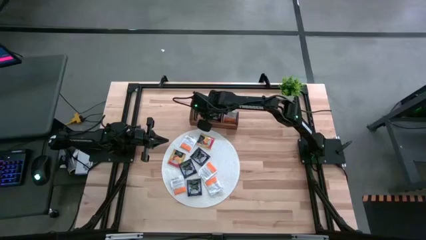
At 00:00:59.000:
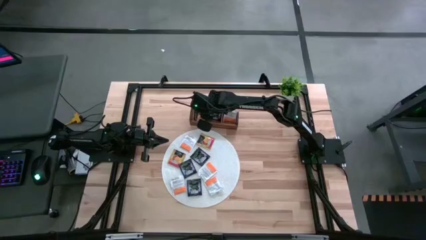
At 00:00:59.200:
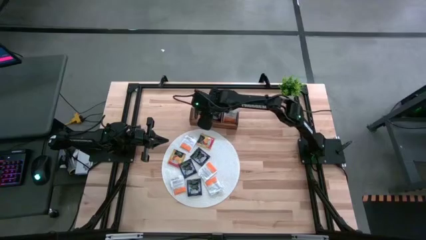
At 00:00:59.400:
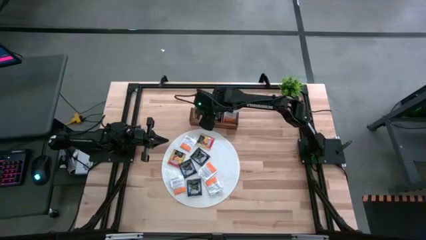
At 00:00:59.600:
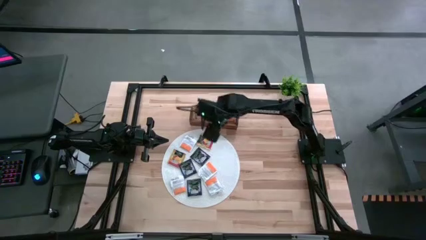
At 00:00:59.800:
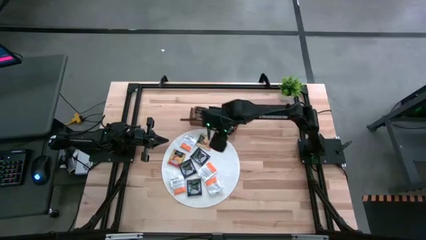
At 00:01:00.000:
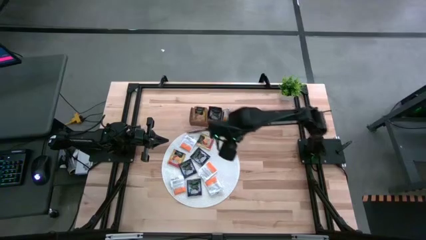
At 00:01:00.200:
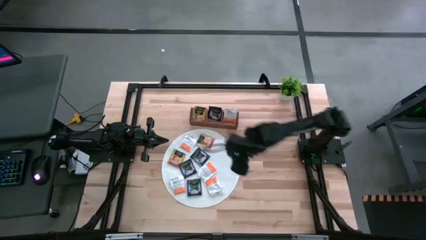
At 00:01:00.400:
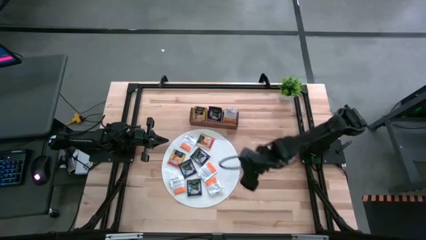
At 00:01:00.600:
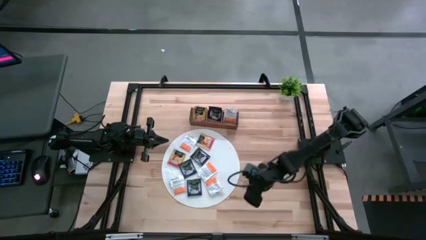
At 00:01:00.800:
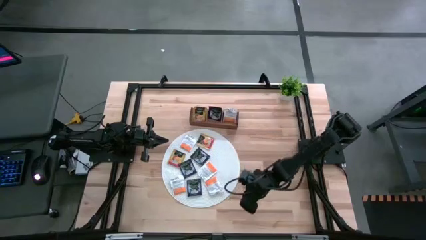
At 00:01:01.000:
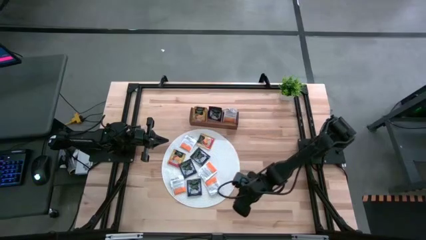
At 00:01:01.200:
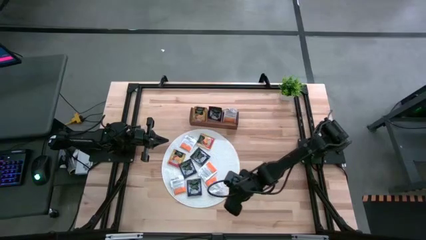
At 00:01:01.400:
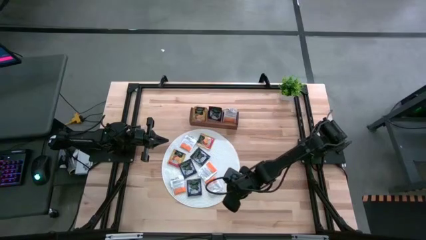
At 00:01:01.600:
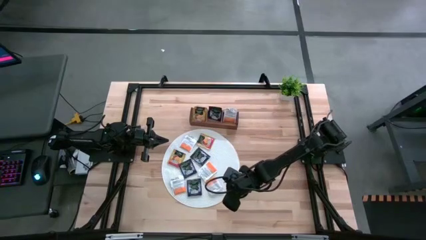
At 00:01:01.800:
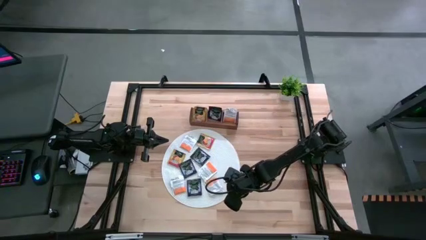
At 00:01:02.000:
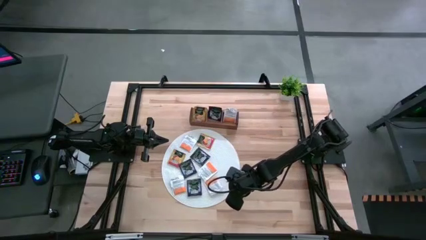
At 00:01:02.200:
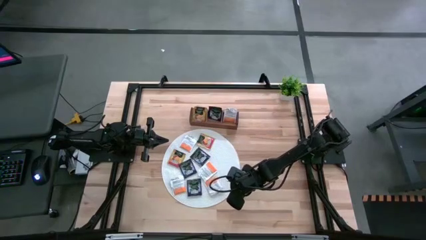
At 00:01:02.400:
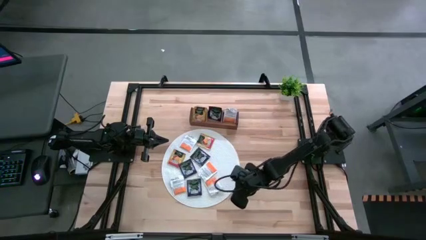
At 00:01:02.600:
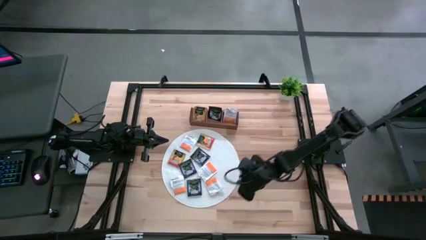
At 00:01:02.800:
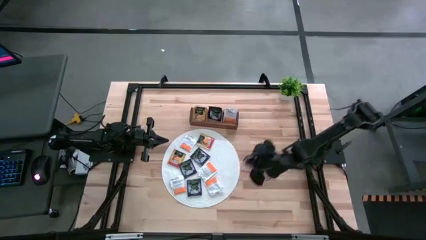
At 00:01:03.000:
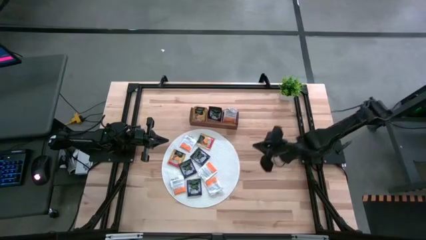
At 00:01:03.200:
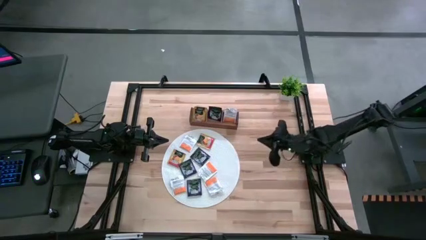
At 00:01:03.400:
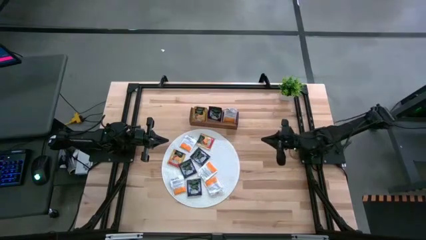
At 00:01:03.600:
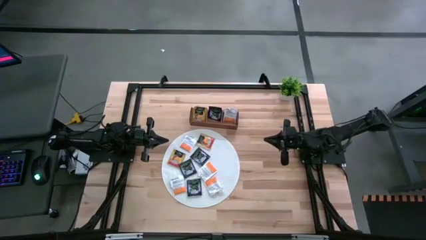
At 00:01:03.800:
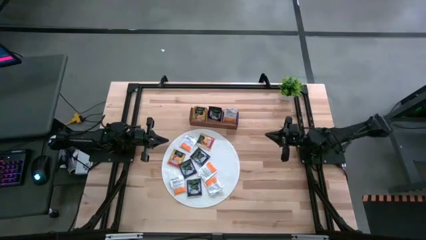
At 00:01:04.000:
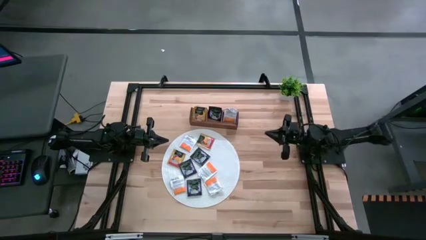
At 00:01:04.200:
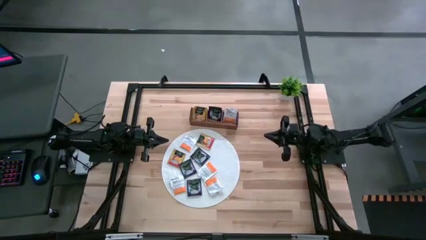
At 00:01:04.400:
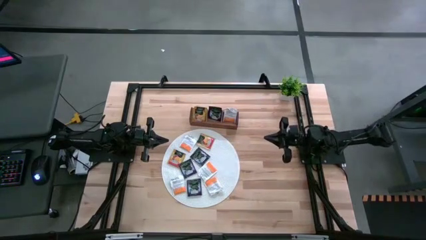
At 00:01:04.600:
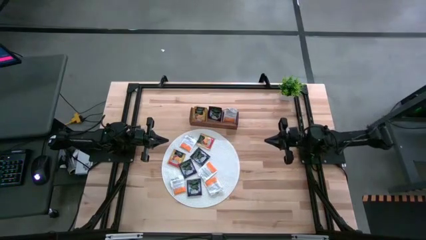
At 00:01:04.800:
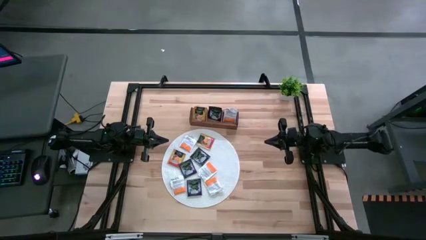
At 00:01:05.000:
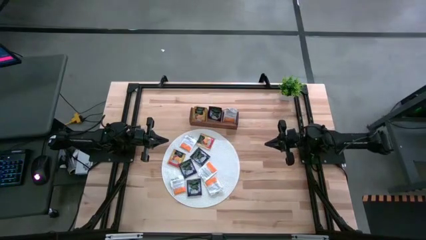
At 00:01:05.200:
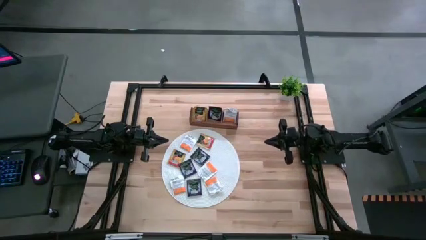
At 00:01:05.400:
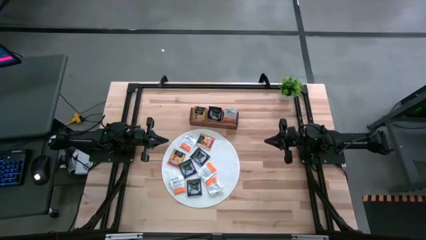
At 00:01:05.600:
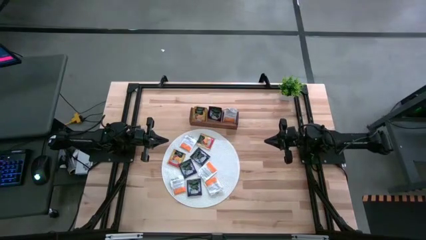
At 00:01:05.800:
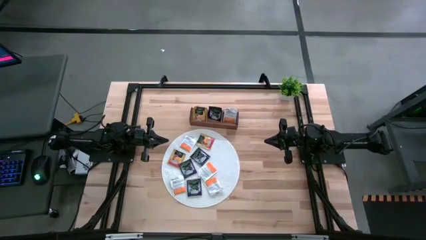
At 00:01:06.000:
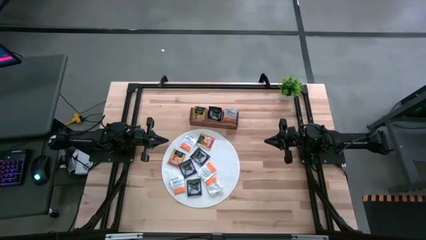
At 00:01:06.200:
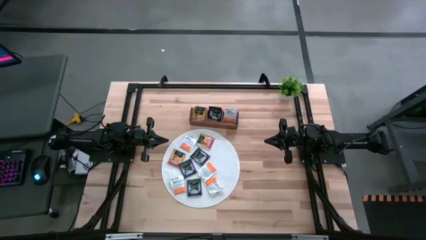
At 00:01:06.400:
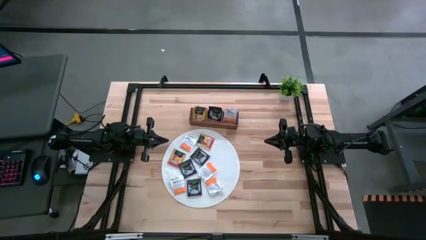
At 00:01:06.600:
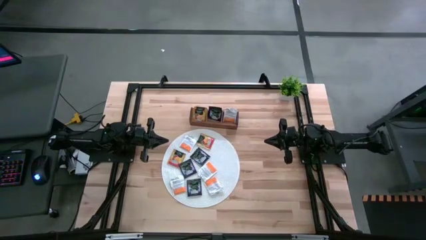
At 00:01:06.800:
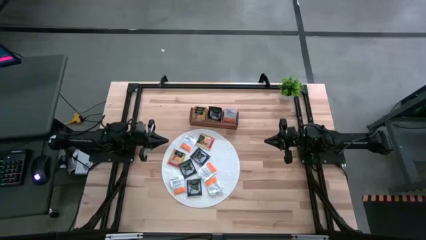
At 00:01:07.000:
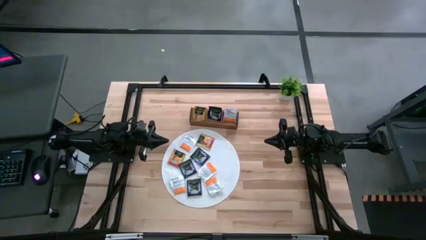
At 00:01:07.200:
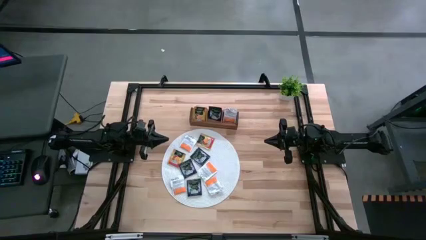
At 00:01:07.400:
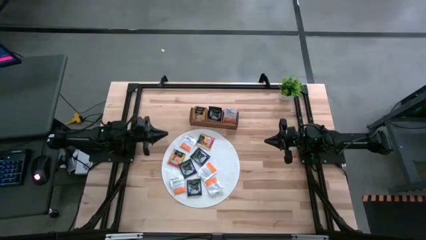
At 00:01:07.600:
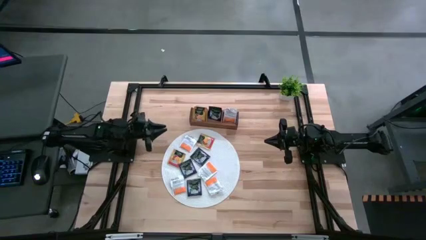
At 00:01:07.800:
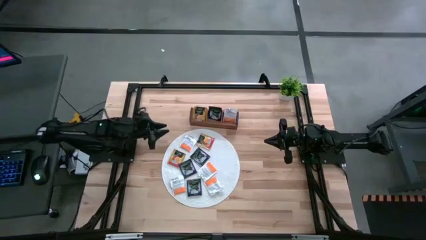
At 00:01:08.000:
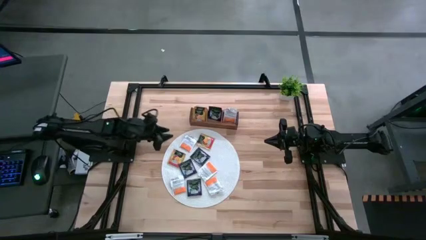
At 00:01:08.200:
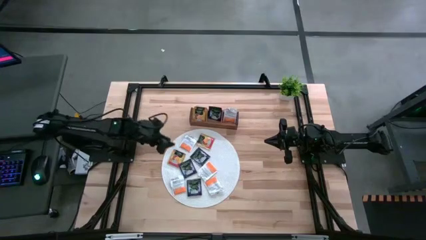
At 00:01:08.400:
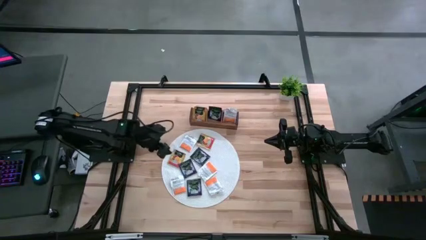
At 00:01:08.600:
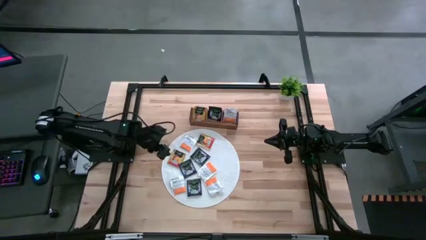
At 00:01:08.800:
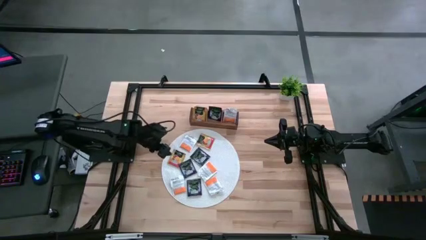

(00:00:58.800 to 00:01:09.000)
Task: Pick & Place Tea
Put the yellow tea bag into the left section of the wooden organizer

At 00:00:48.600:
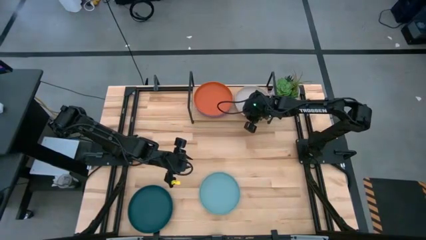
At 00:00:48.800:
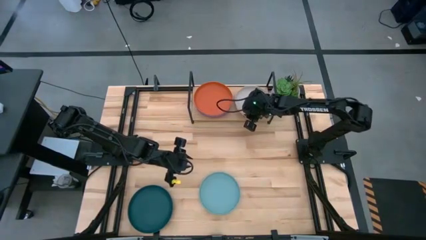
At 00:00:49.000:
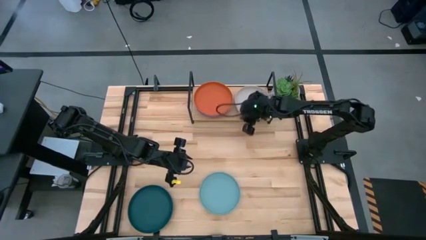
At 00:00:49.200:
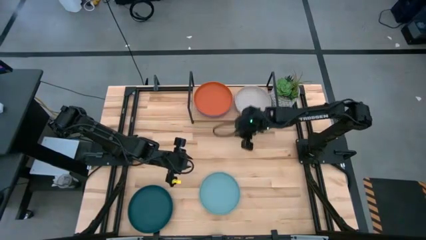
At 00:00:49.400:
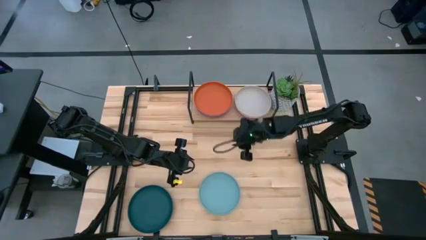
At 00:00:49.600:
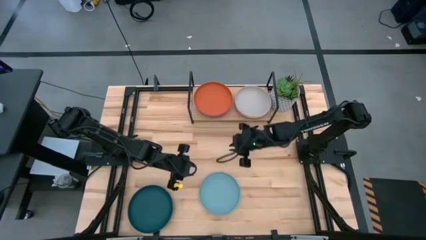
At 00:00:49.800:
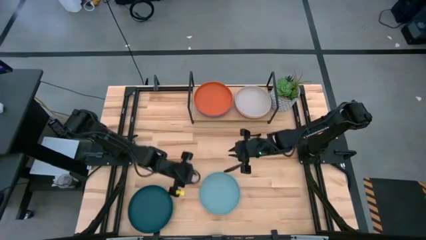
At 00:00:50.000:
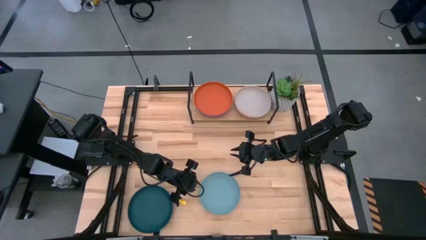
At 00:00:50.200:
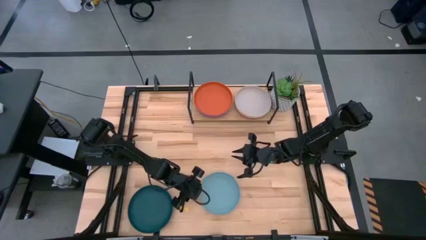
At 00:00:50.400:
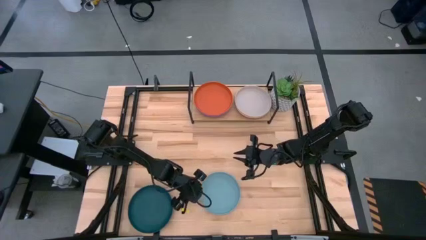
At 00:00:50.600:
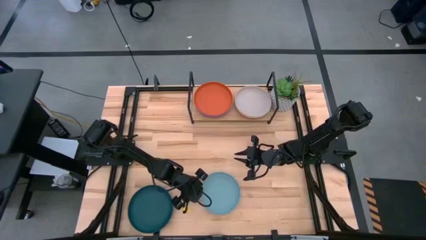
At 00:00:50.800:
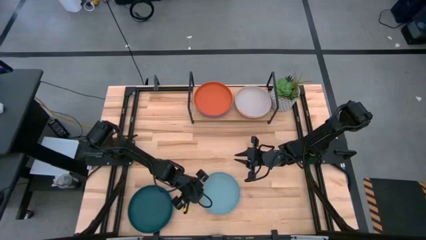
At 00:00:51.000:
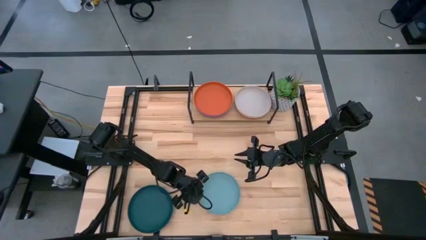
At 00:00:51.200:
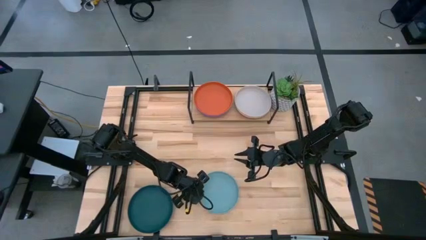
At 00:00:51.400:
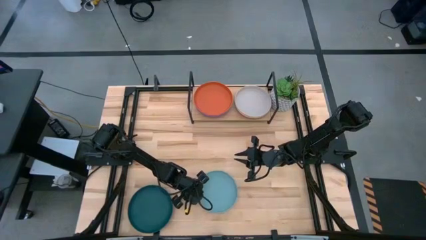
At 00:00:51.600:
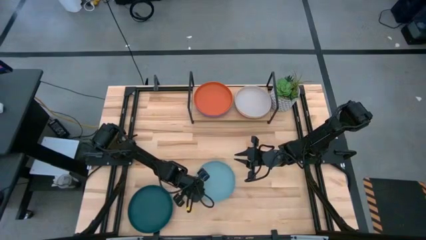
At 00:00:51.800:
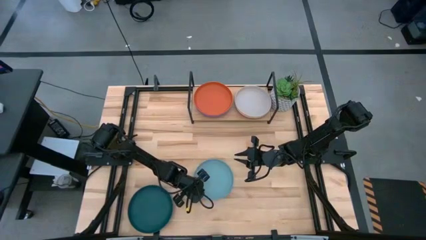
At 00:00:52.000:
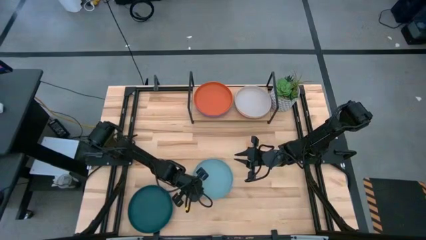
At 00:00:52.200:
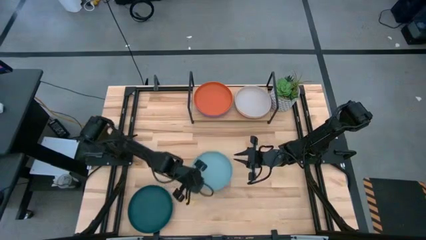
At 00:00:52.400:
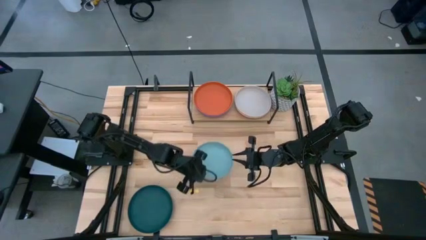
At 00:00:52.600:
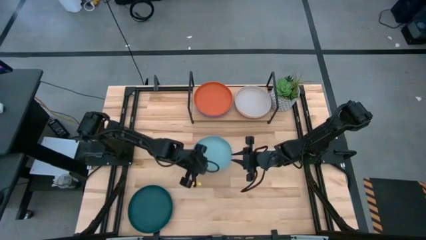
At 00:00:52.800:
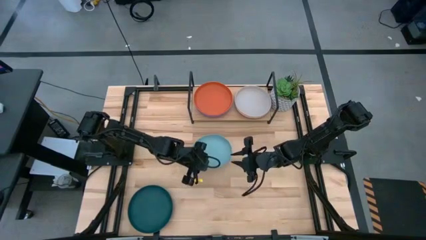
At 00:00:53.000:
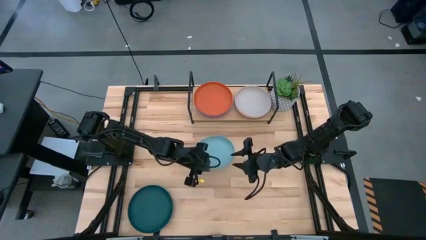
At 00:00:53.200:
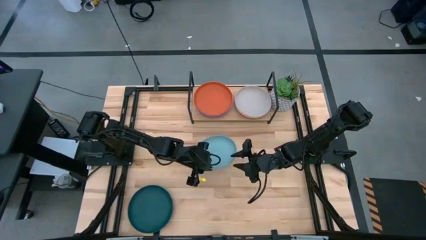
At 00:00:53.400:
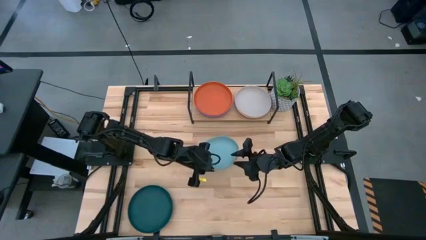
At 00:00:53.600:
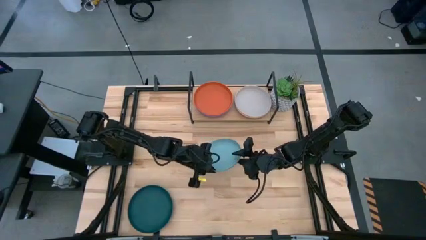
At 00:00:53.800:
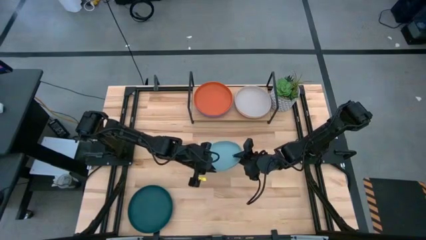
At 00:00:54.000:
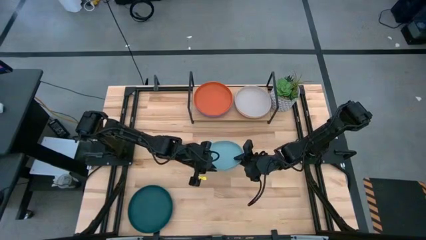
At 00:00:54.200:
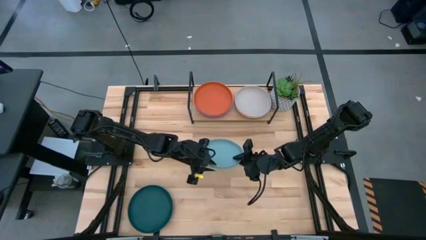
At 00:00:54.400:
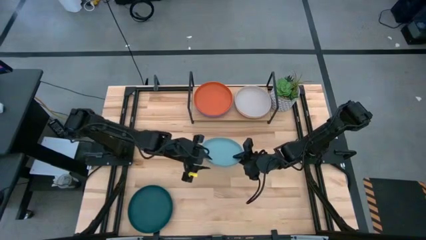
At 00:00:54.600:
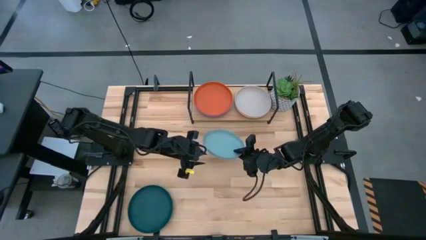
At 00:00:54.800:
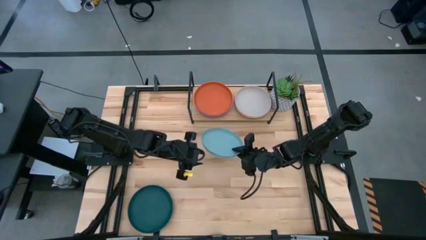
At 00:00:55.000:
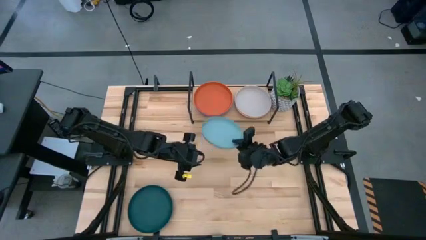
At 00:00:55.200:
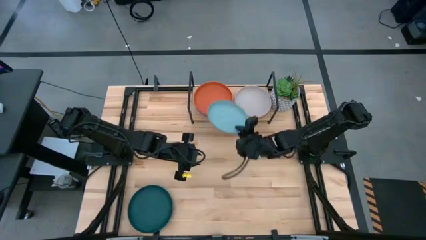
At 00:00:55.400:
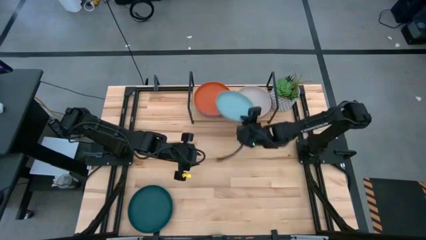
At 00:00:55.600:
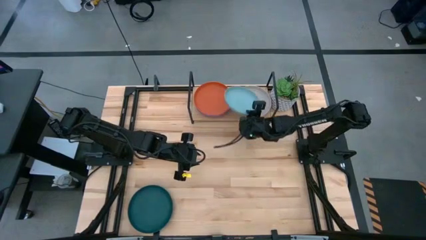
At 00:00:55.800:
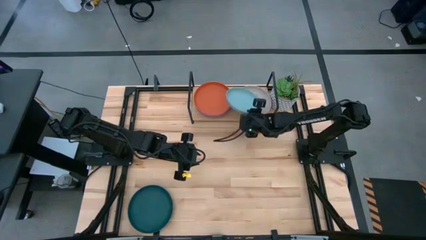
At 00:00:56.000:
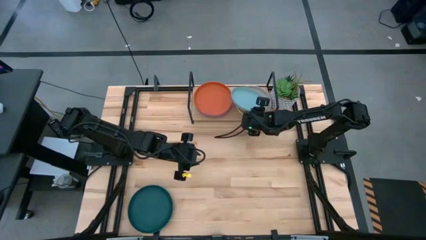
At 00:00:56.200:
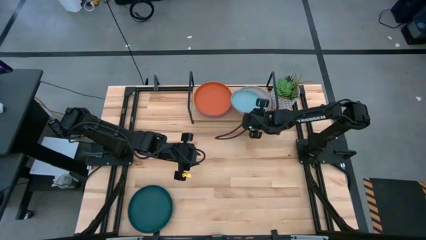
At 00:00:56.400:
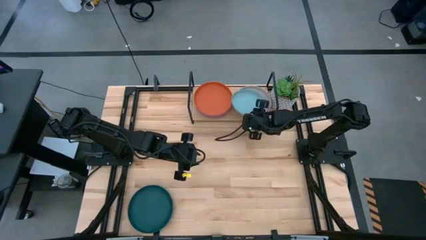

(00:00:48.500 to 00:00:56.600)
Task: Place and stack plates onto a shelf
Stack the light blue plate on top of the gray plate on the shelf
